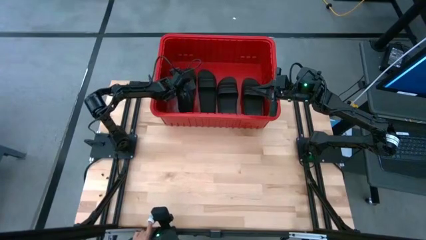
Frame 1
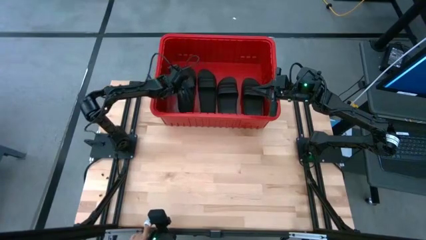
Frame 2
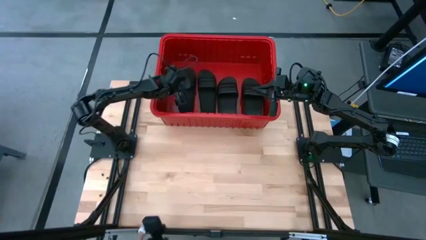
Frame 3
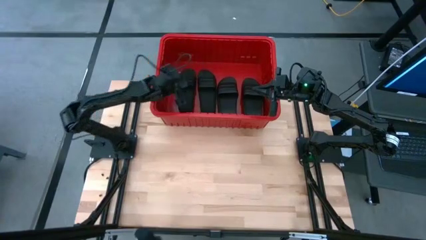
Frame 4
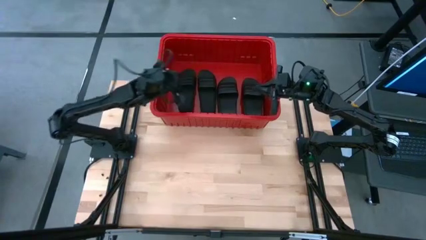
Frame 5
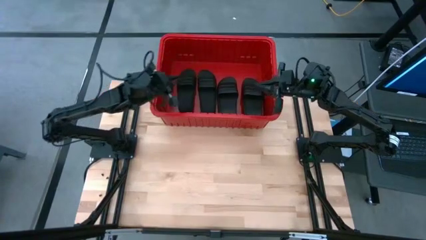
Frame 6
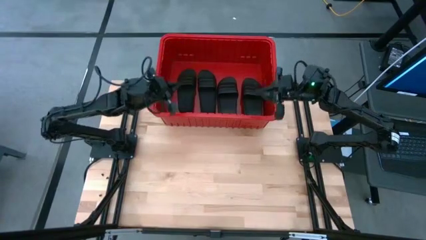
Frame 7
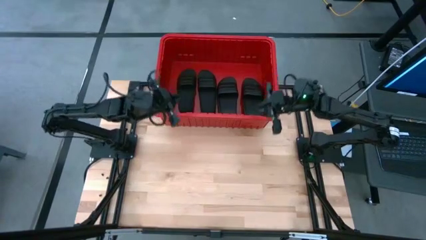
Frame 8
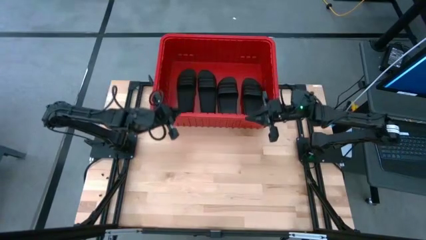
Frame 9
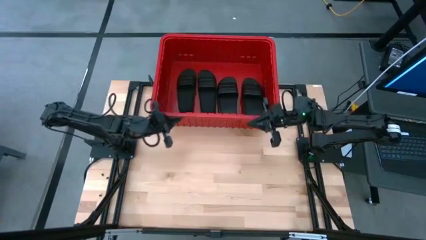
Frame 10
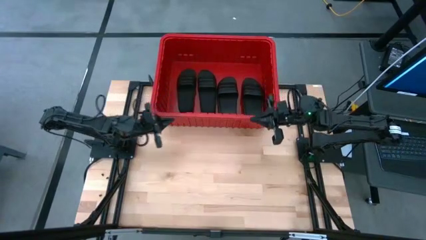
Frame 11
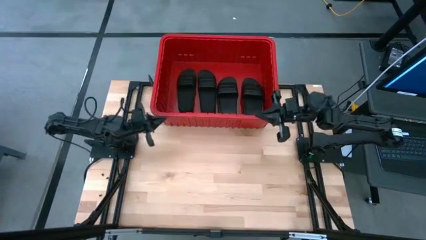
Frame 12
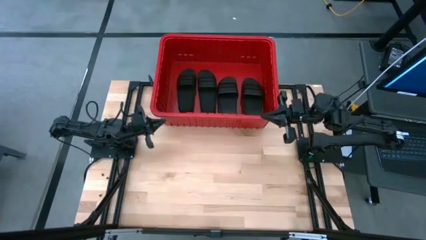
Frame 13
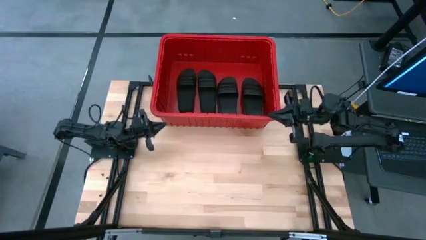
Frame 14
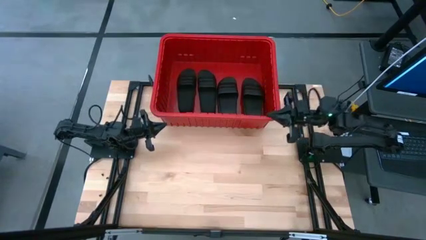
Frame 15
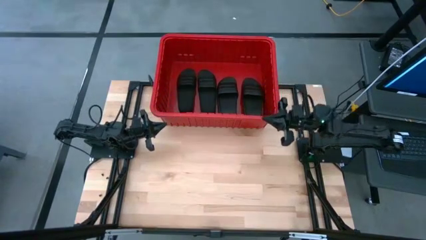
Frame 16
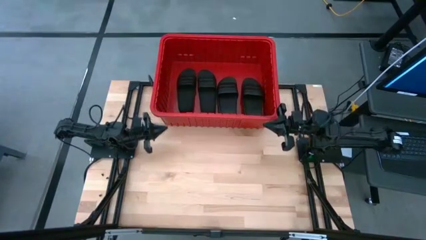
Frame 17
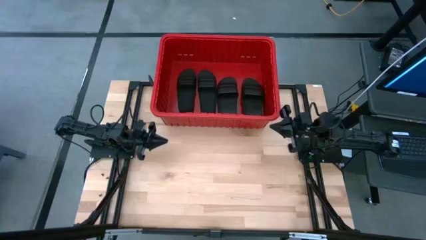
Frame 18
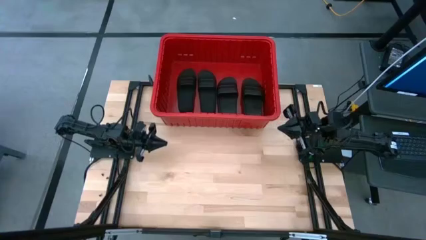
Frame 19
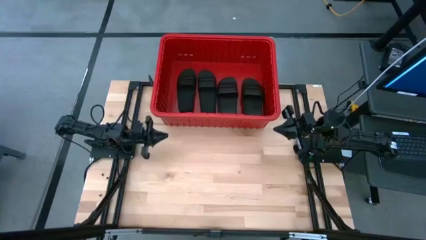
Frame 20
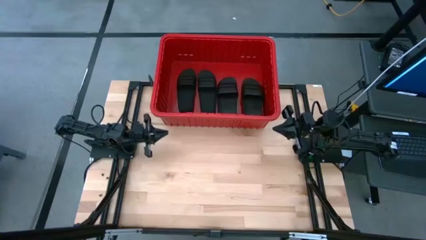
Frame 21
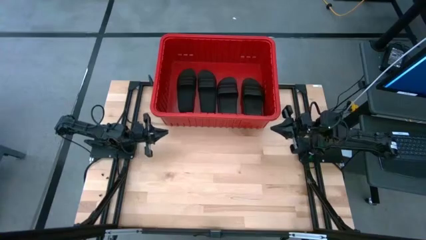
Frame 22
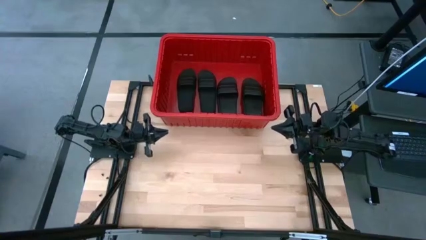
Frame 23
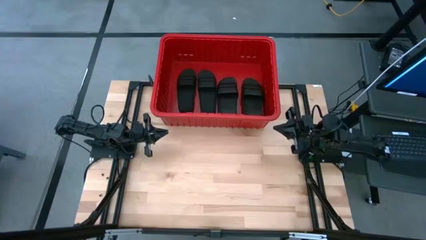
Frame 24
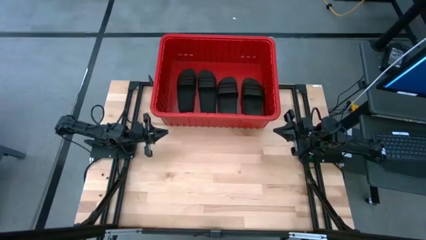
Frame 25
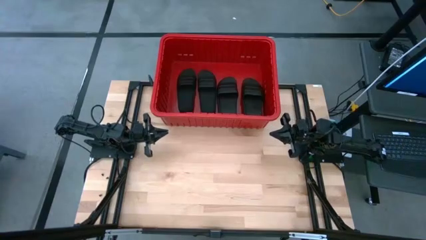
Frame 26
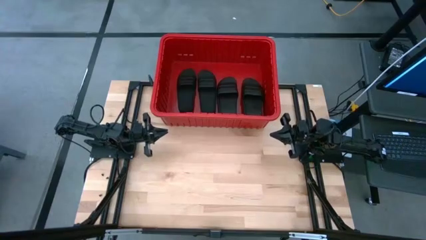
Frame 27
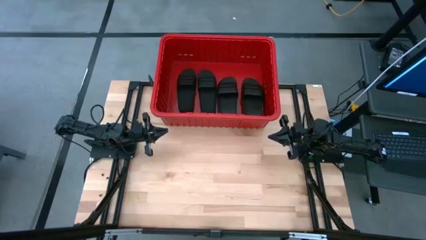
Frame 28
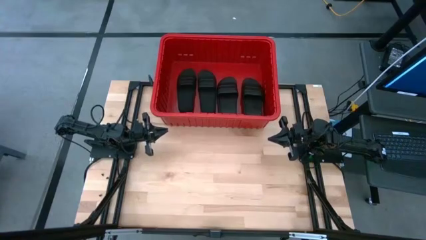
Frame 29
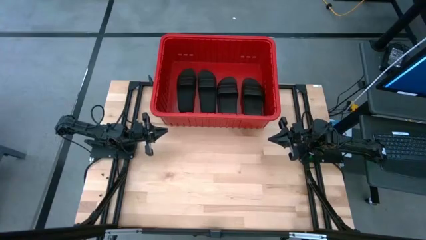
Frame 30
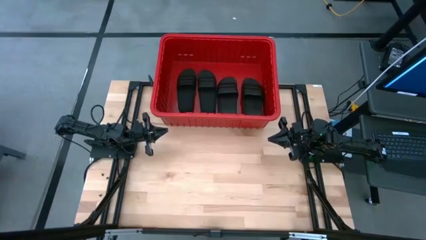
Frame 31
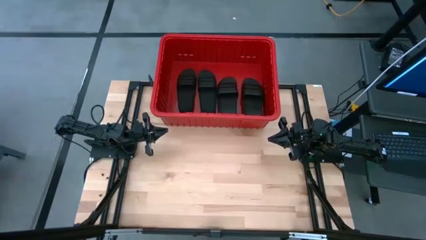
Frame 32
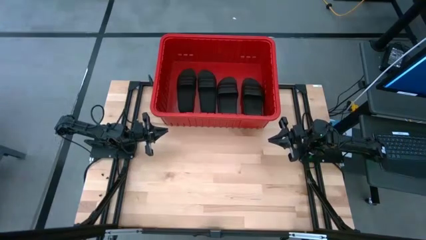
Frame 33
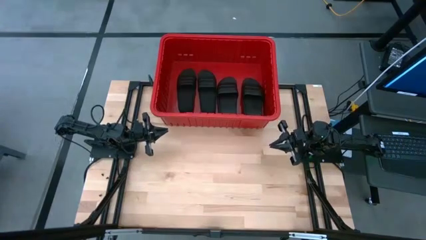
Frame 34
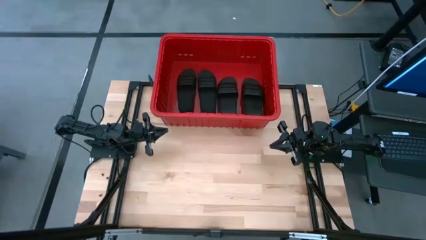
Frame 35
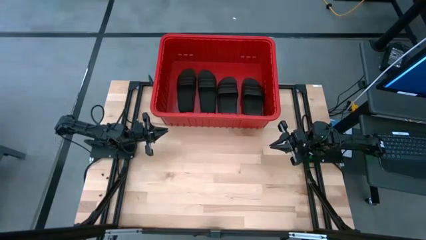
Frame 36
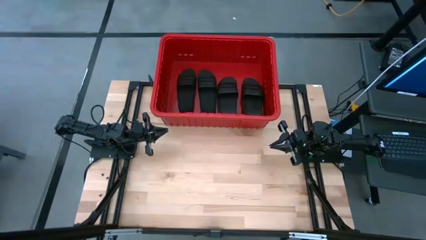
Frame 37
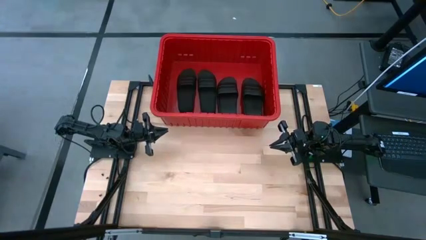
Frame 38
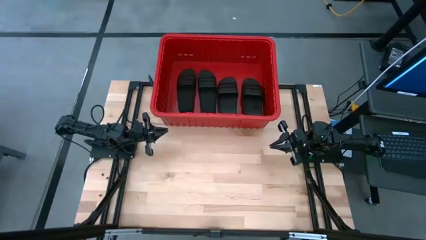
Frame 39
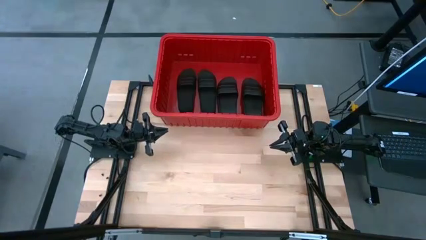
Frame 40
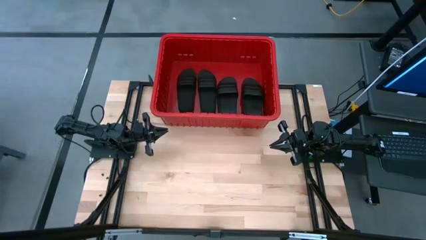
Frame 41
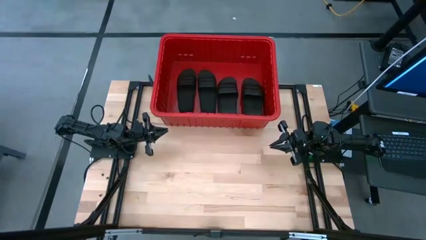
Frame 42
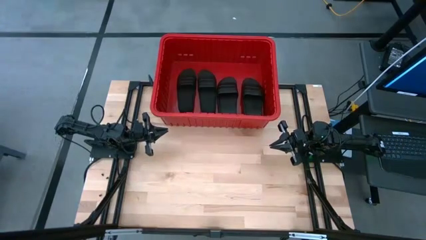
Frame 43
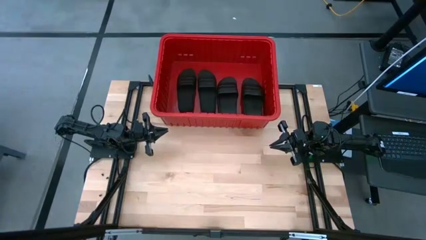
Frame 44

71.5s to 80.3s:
Task: Pick and place slides into bin
Return to Home Position

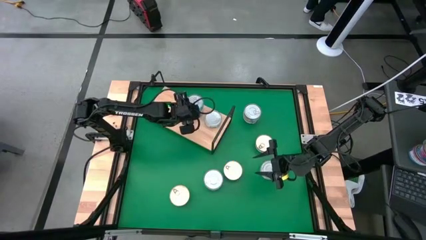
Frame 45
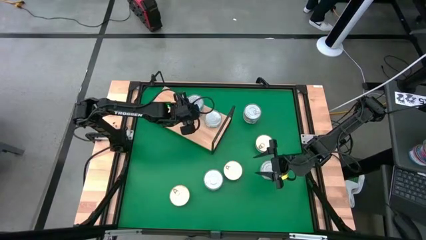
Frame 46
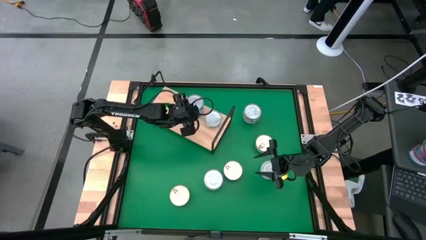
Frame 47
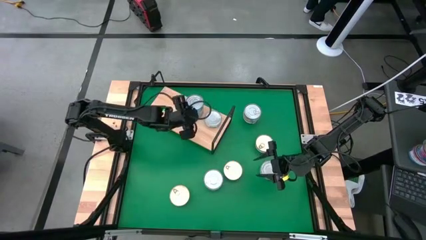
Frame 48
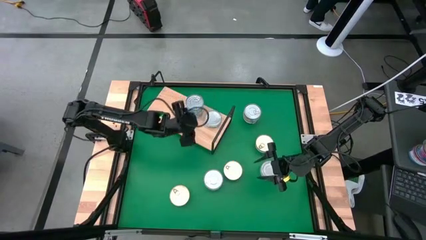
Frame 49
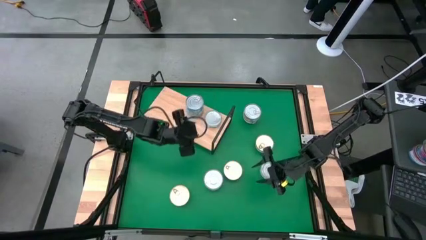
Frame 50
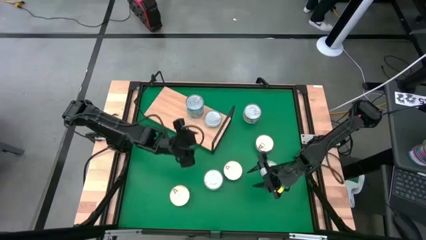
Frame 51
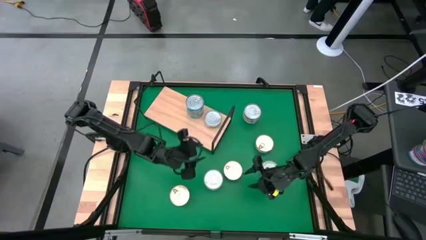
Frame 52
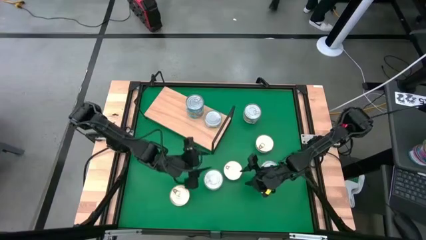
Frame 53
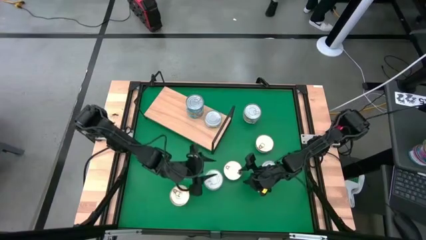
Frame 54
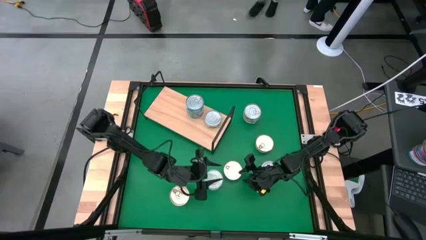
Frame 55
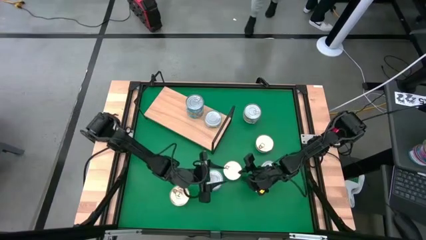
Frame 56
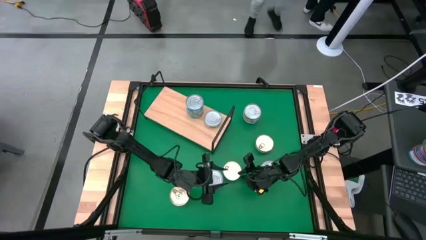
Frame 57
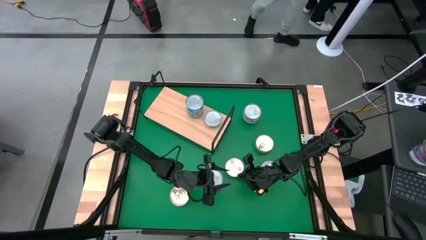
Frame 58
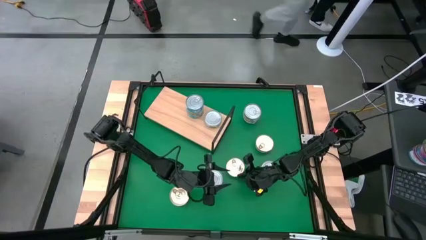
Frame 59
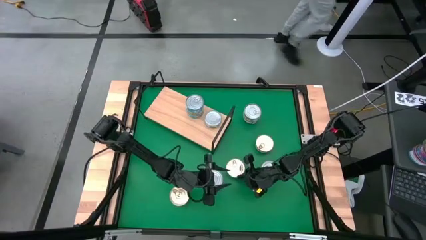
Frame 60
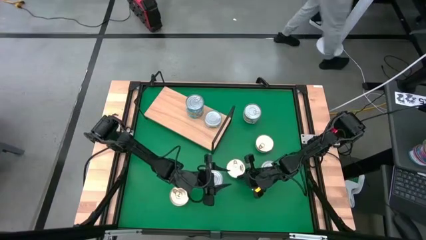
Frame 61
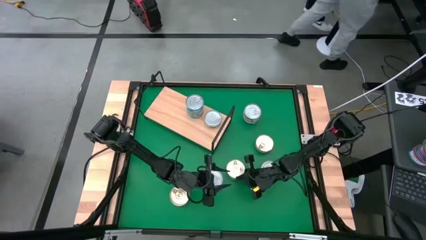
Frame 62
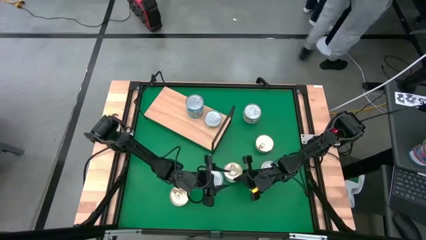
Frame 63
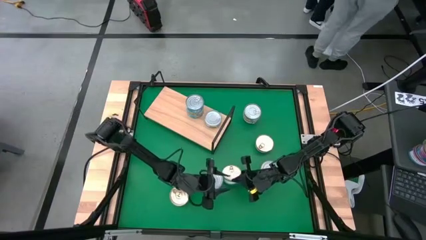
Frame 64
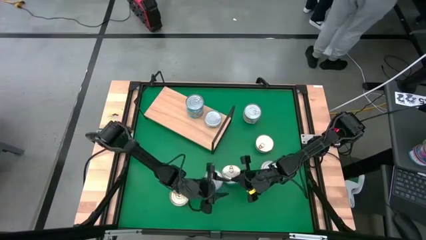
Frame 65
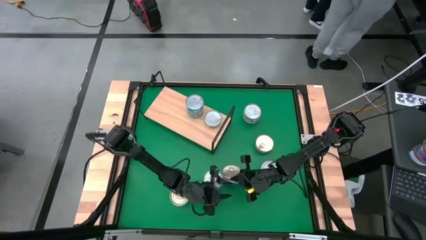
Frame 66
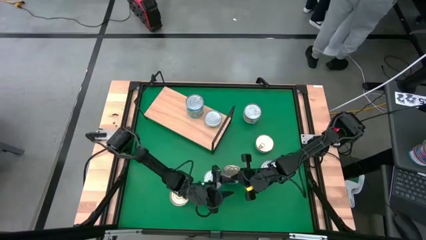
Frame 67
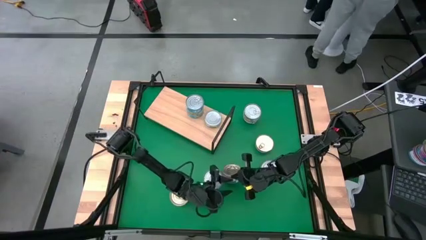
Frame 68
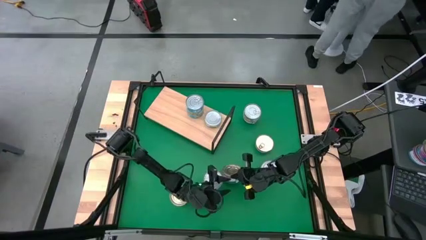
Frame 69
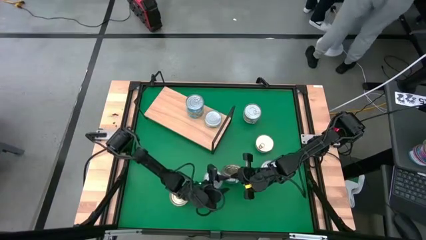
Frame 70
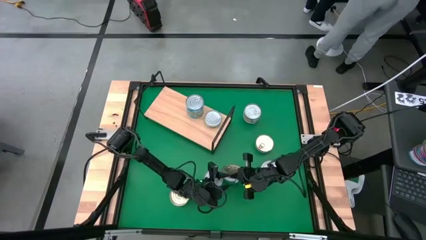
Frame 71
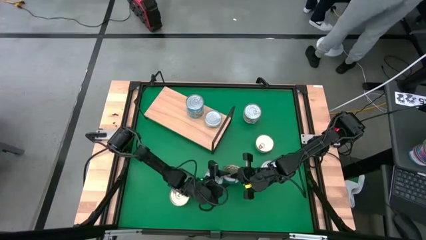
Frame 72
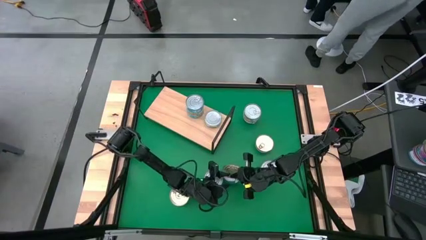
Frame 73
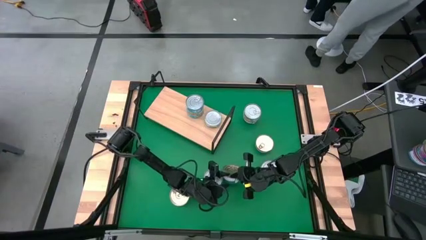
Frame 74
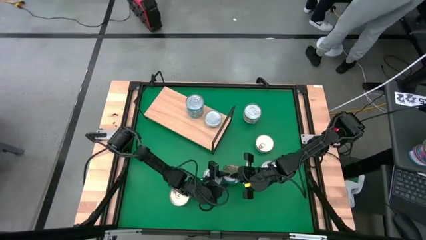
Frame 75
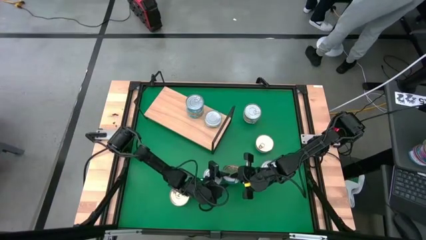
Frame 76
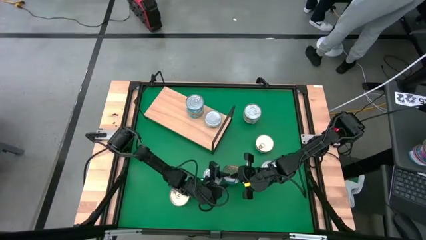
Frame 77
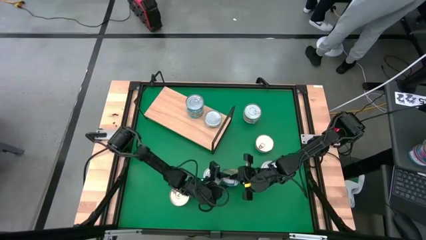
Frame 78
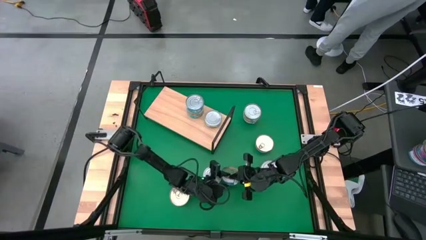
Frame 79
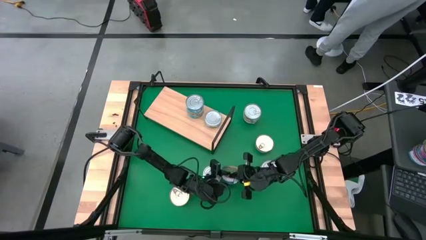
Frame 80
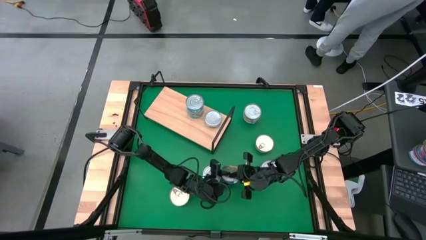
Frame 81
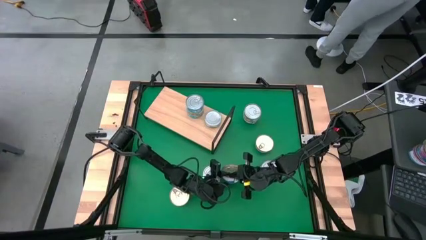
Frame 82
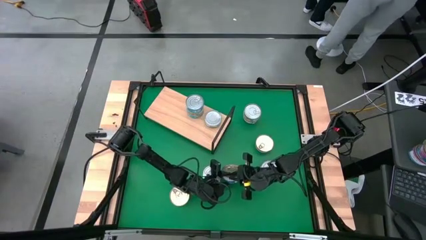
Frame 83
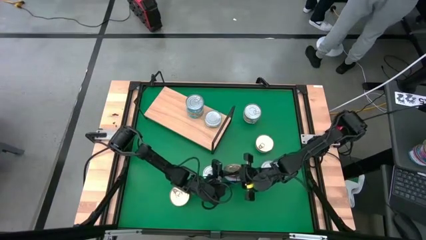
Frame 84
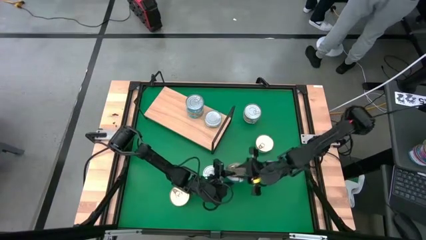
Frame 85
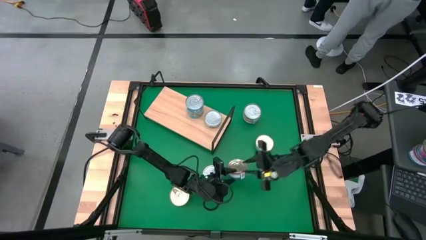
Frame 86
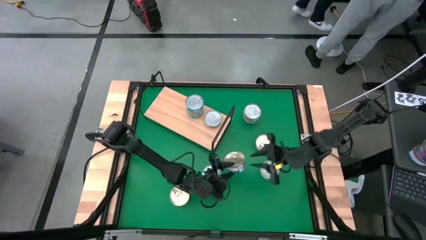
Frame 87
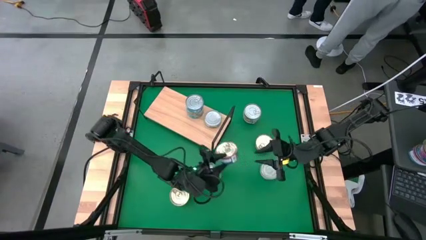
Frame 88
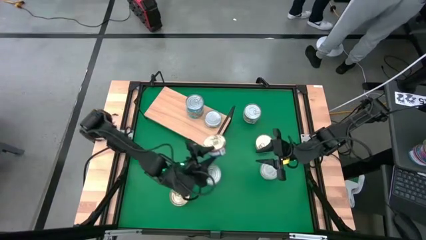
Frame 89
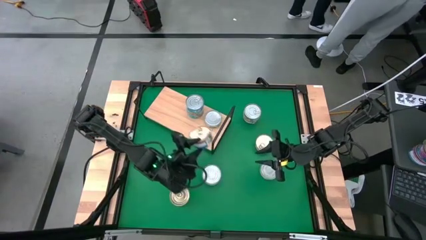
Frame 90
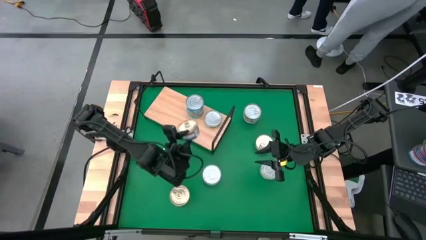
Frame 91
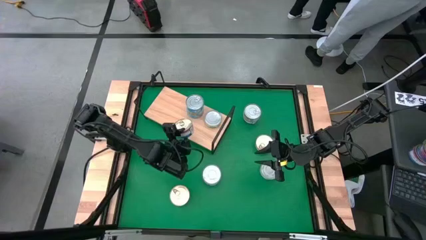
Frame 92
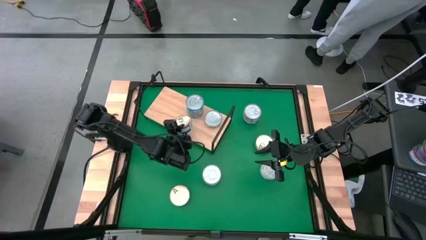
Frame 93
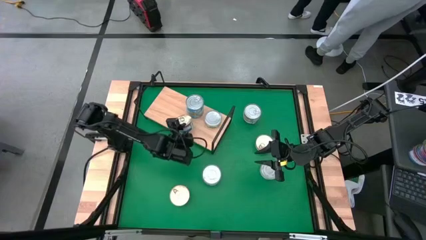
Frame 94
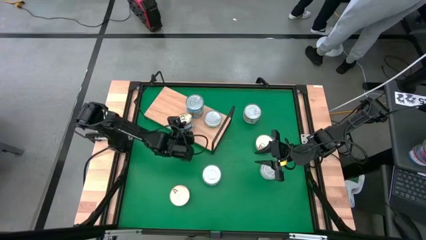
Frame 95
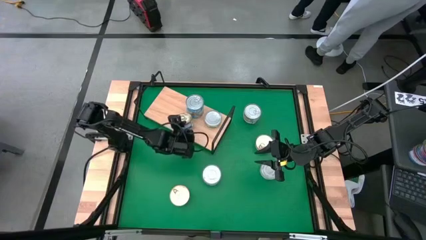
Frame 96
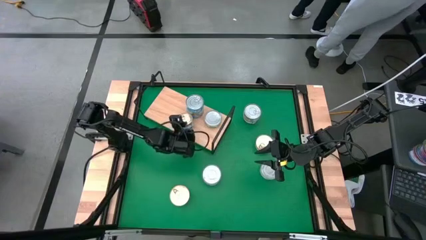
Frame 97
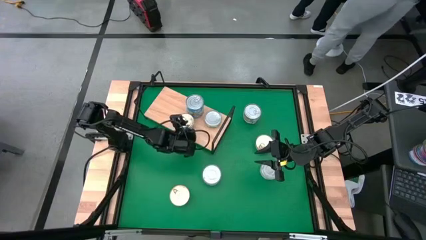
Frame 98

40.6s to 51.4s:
Task: Stack canned seafood by type on shelf
Put the blue tuna can on the shelf
